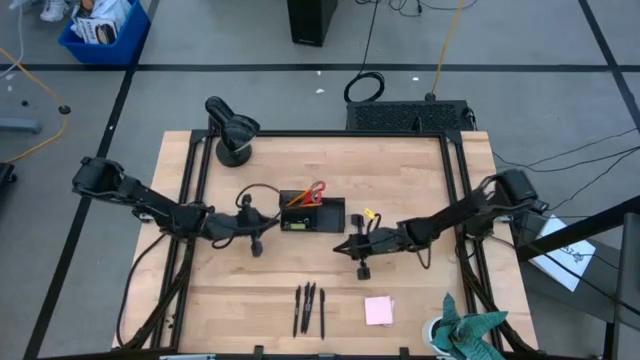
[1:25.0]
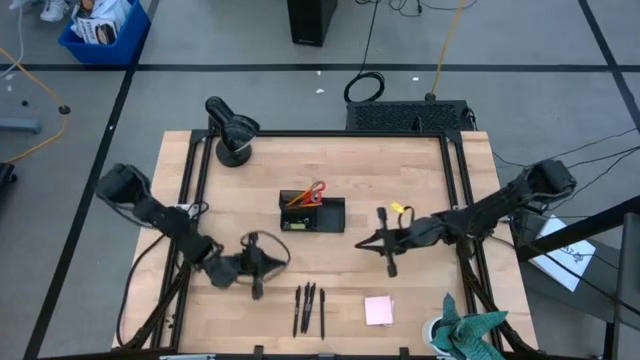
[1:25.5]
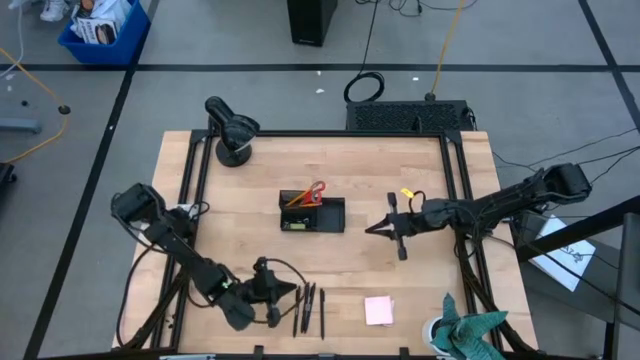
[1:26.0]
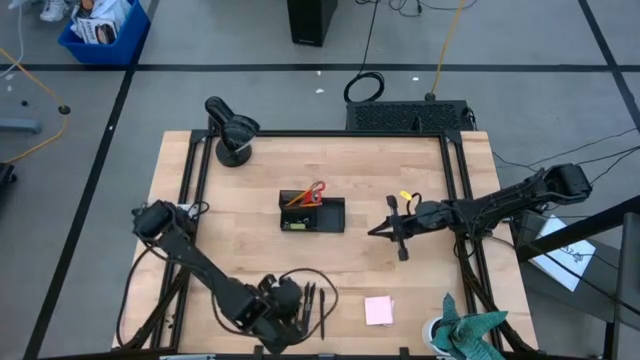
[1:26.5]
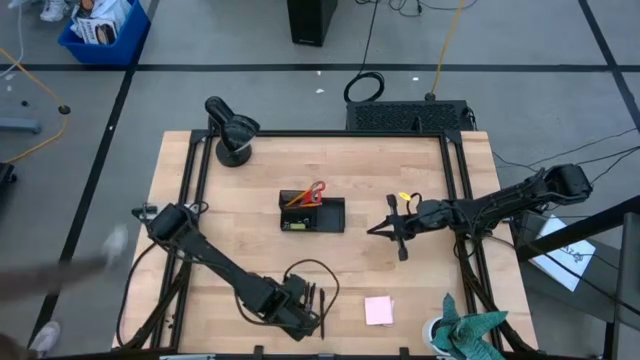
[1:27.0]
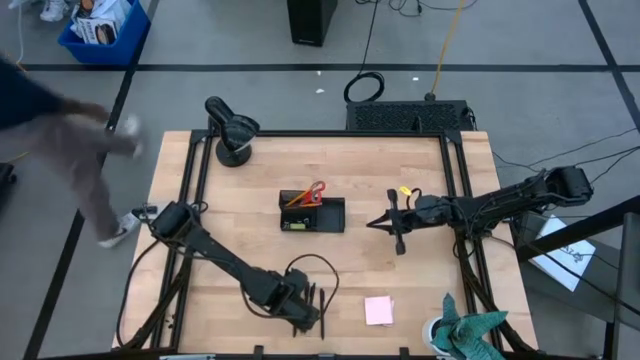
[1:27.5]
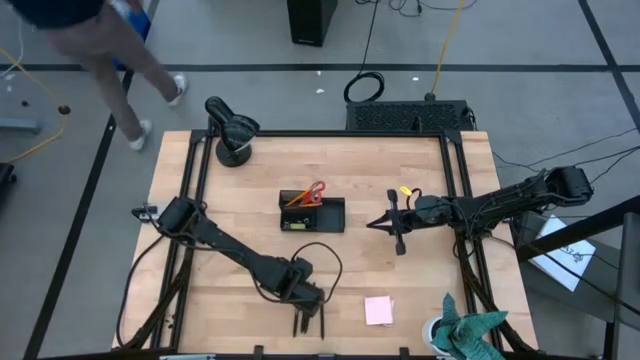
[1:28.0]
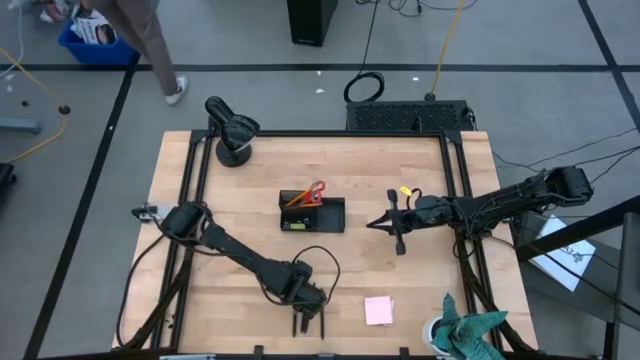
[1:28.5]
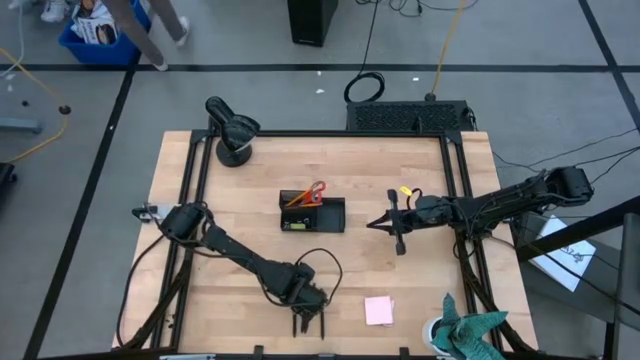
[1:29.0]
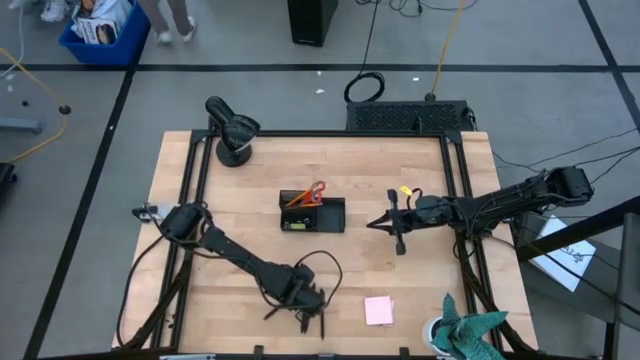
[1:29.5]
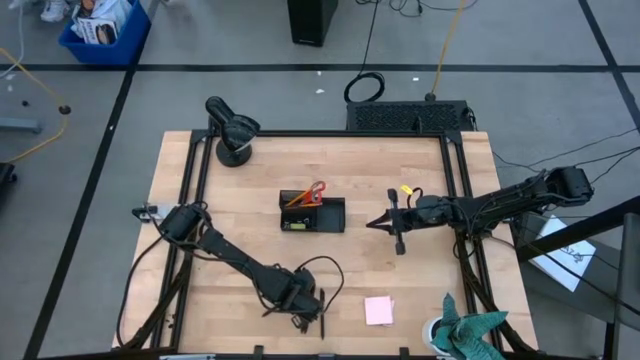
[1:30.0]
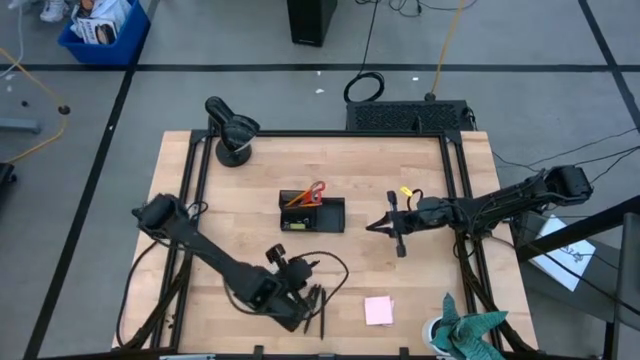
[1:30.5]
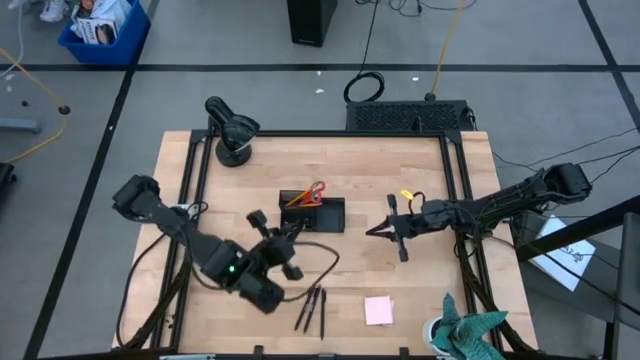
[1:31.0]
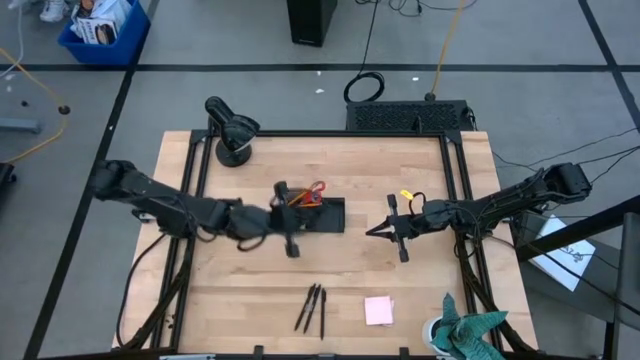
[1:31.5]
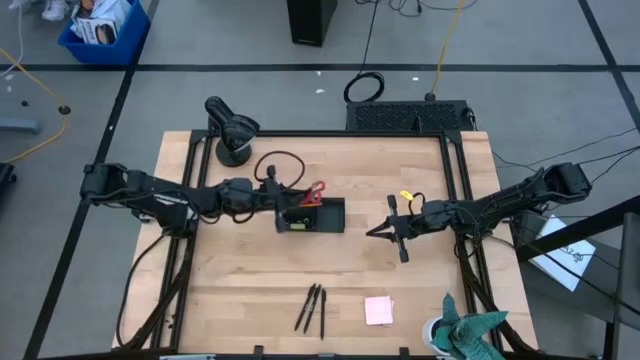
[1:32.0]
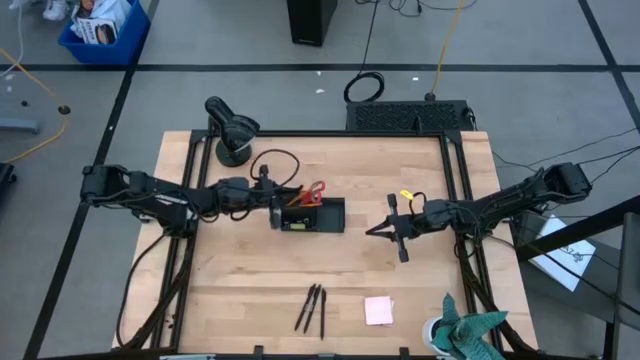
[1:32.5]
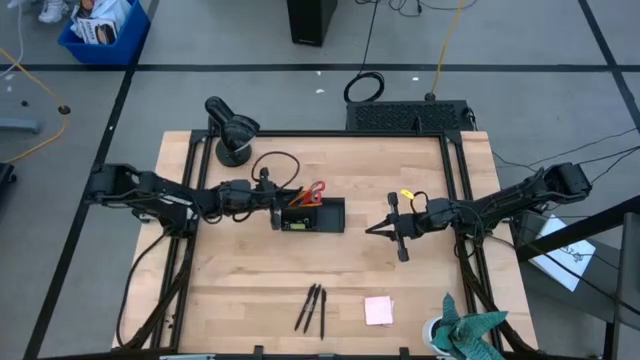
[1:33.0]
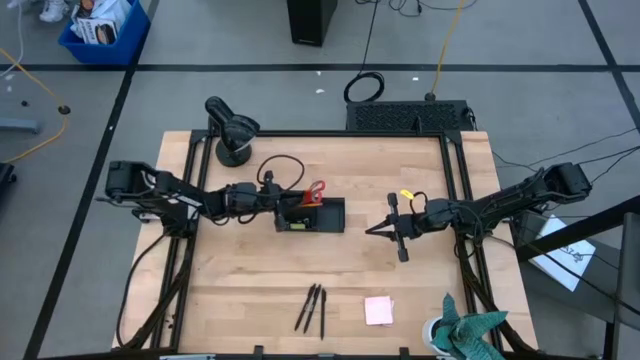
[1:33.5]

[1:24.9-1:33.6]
Task: Pick and place office supplies into organizer
Put the black pen into the black desk organizer

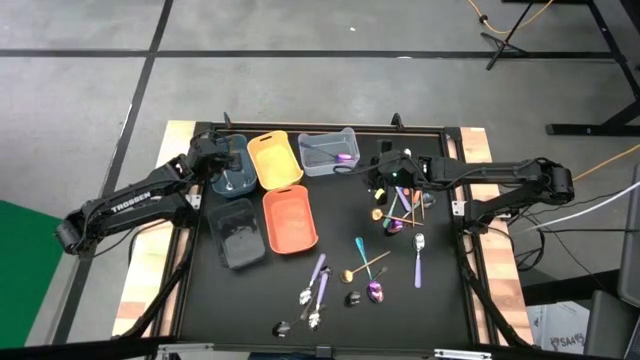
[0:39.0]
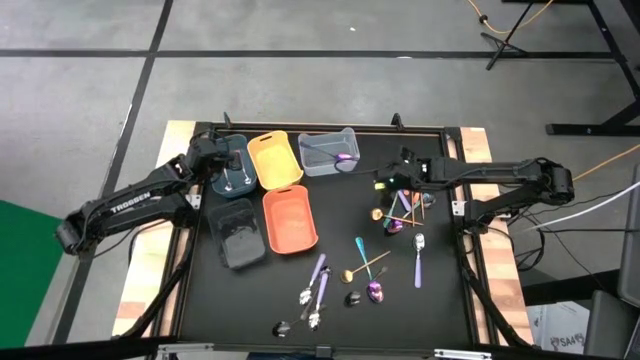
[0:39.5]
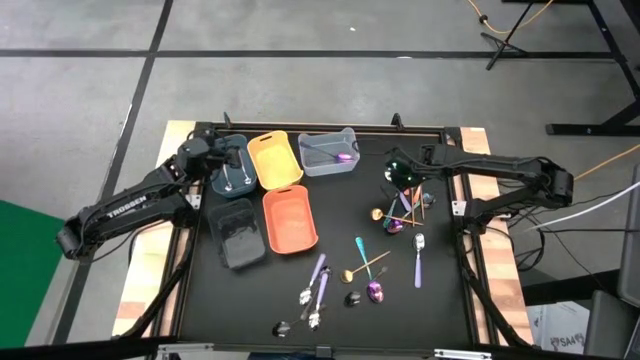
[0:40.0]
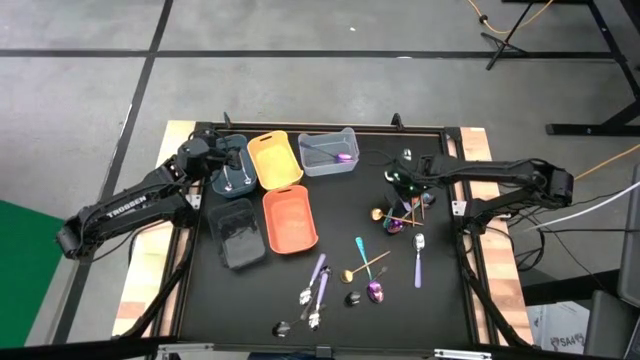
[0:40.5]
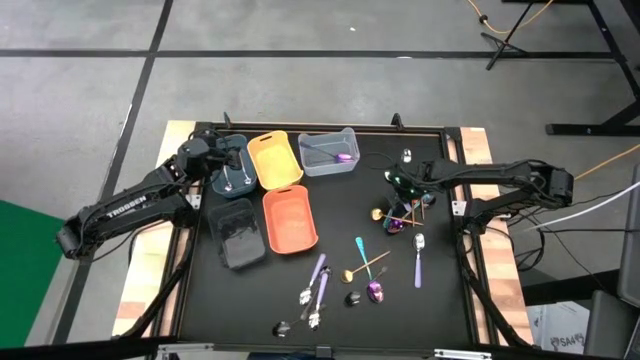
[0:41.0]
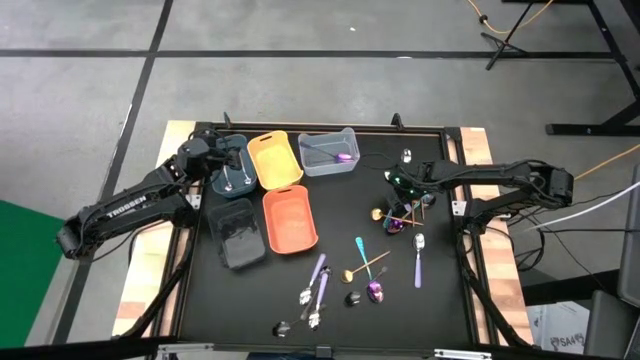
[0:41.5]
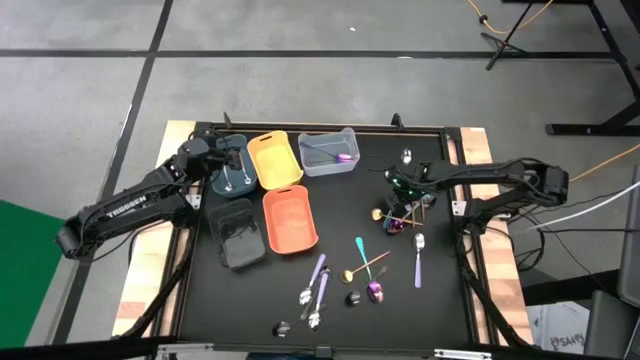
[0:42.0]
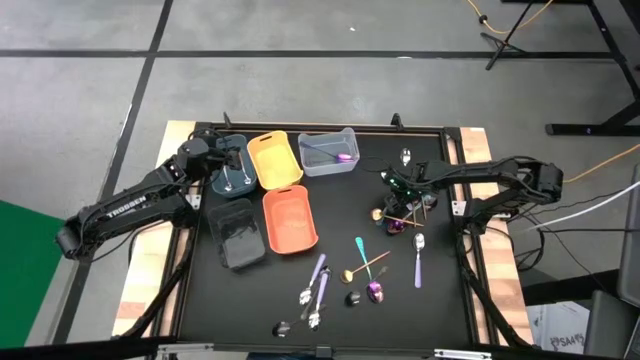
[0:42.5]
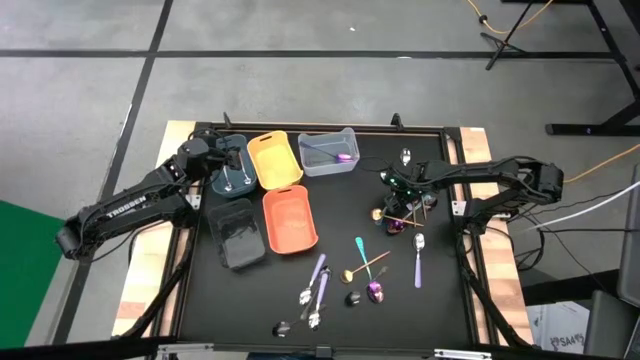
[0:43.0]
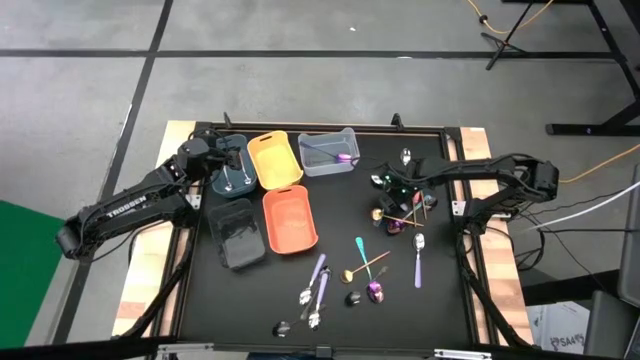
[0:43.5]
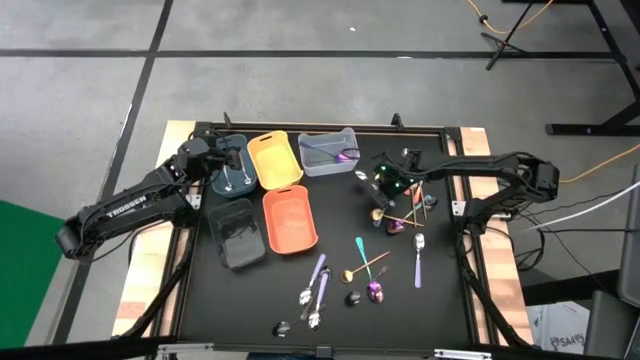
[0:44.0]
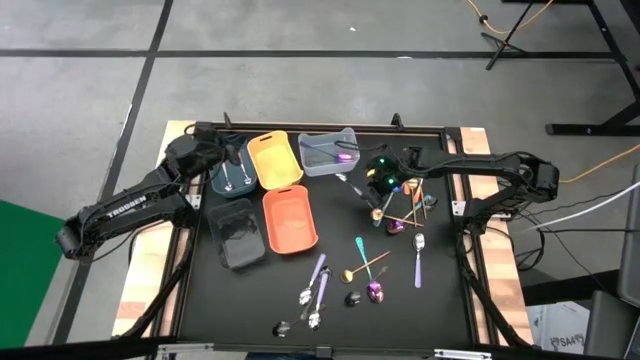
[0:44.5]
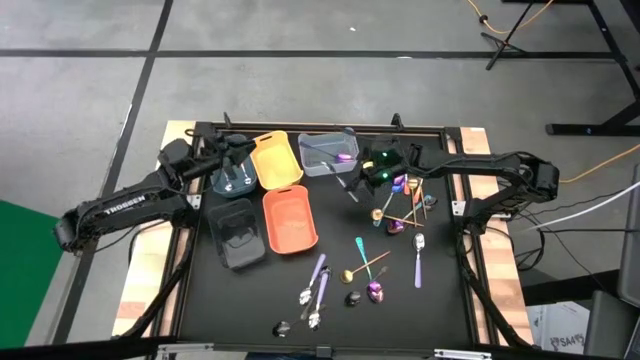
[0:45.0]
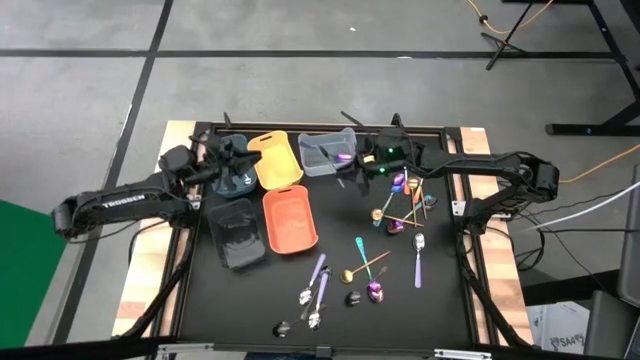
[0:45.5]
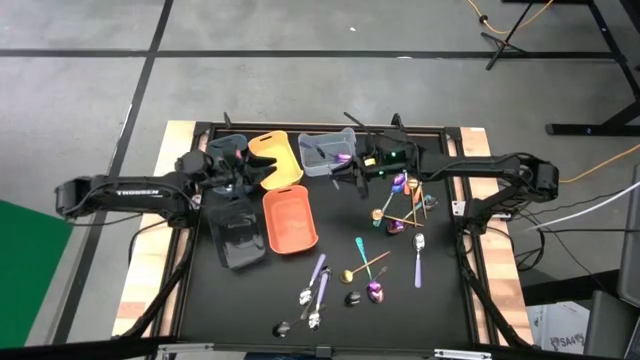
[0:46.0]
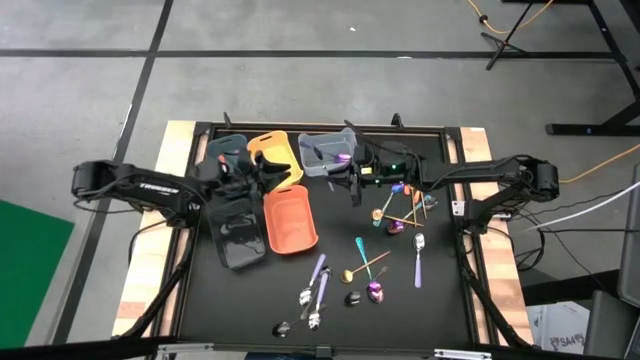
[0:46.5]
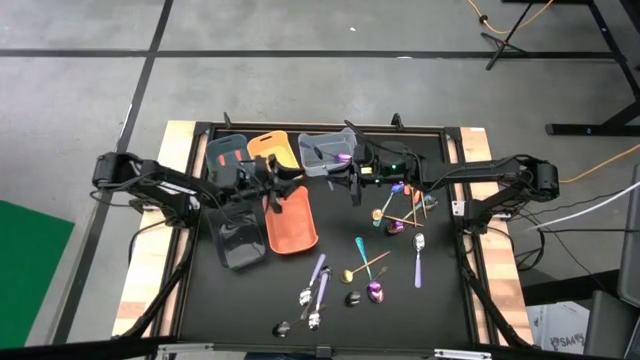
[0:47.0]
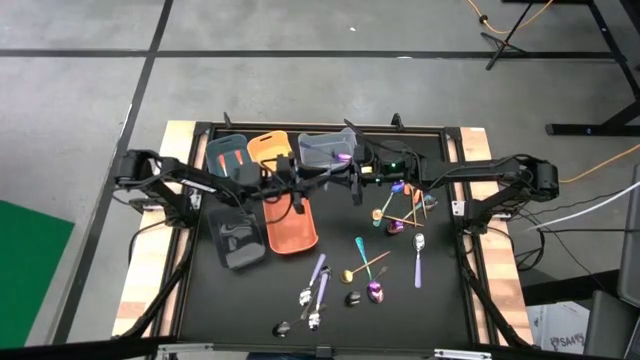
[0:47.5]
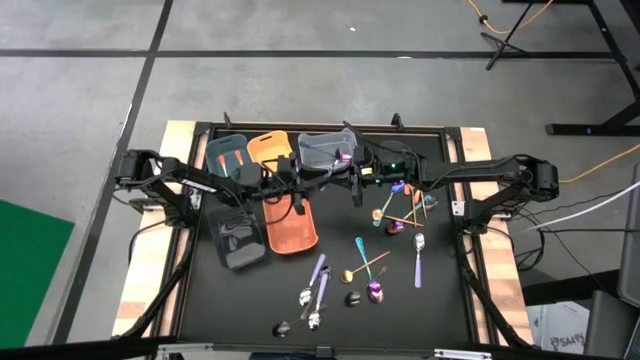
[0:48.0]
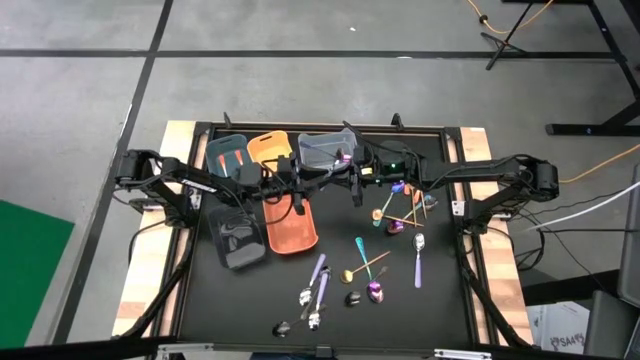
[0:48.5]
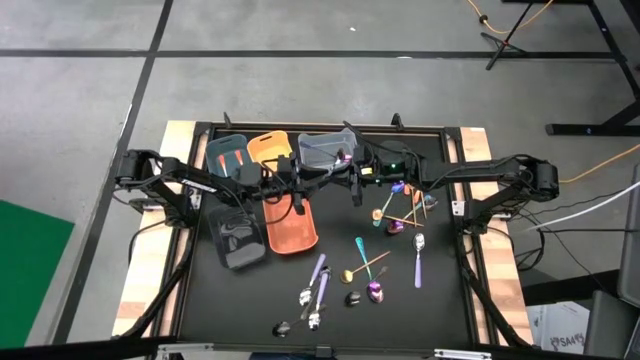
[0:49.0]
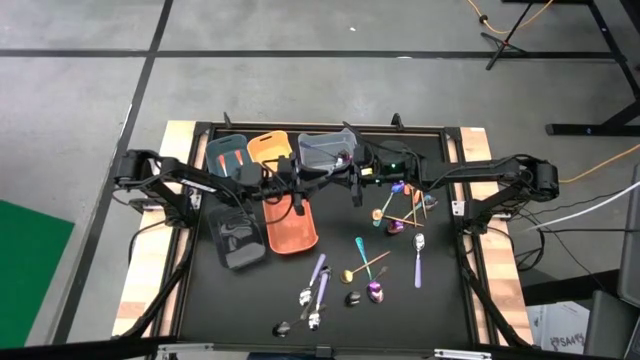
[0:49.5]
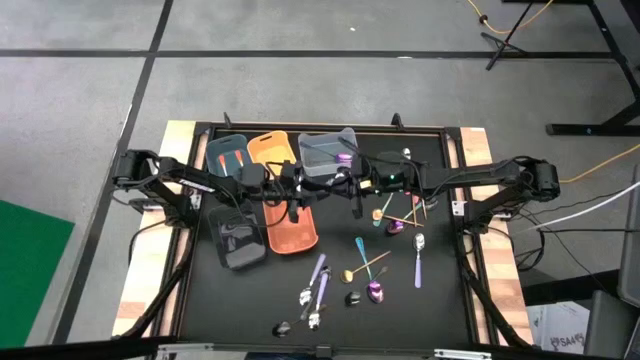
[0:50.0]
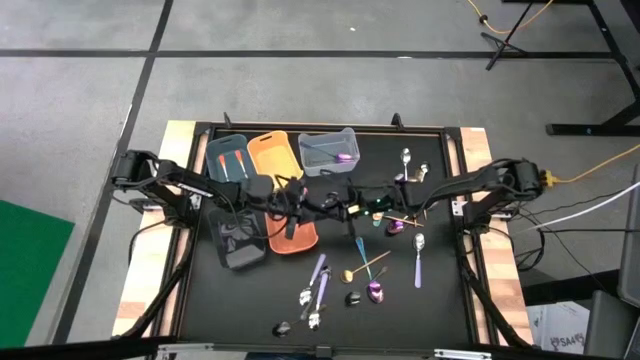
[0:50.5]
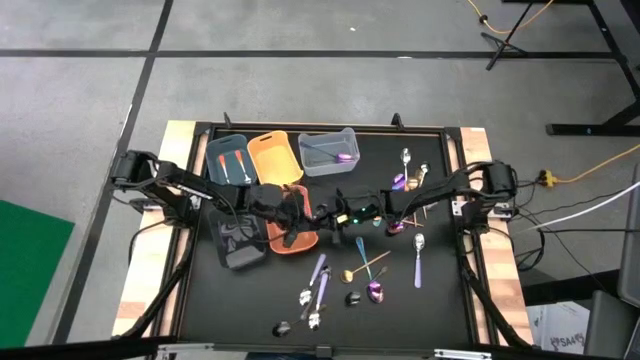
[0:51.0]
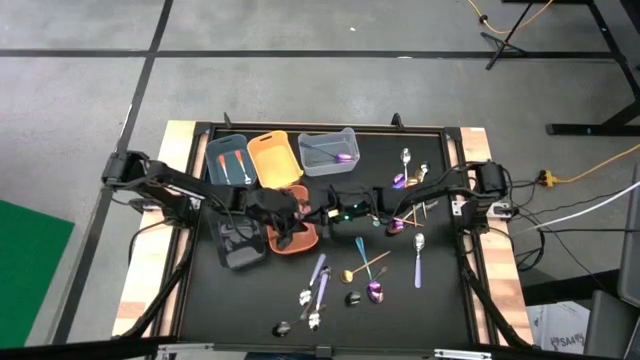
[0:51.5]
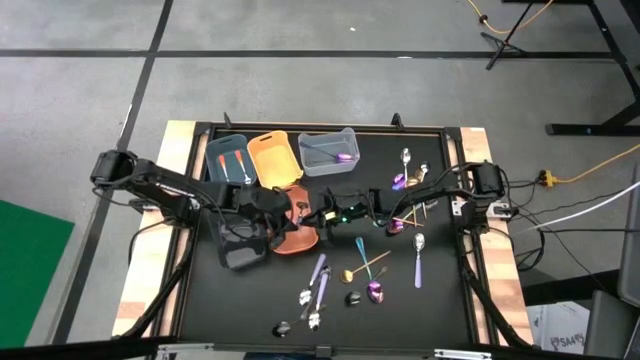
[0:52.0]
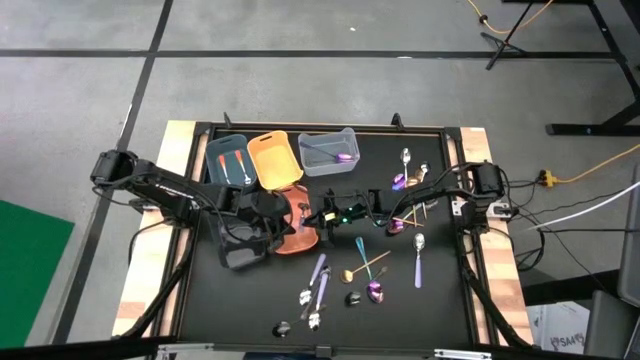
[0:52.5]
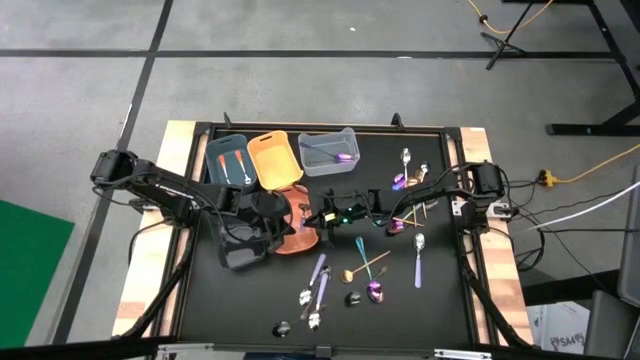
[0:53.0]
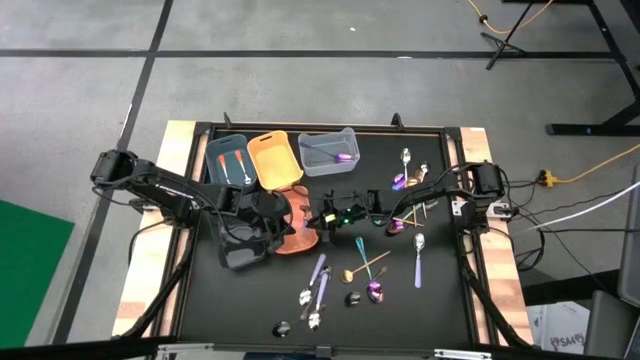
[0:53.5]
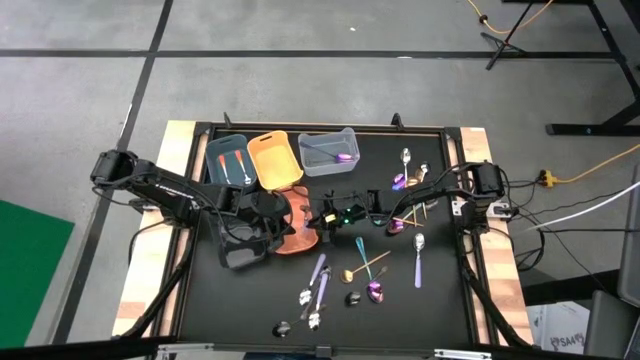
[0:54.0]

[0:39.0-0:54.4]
Task: Sort silverware by color (type)
Put the purple spoon into the orange bin
